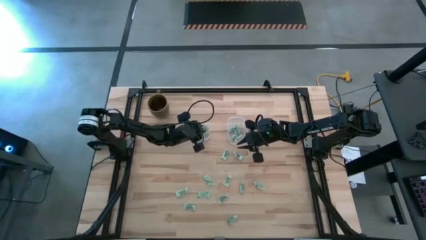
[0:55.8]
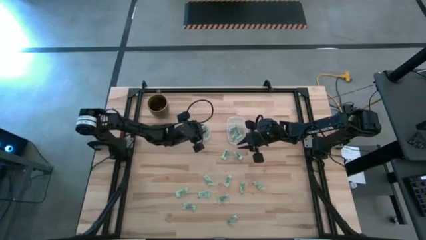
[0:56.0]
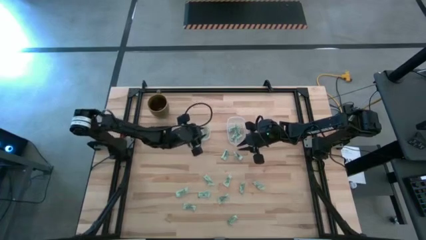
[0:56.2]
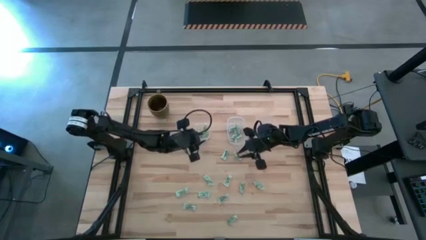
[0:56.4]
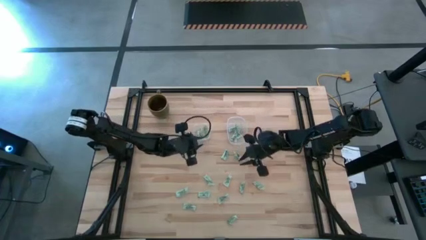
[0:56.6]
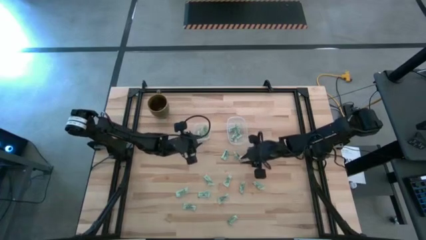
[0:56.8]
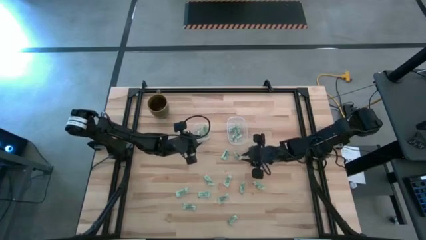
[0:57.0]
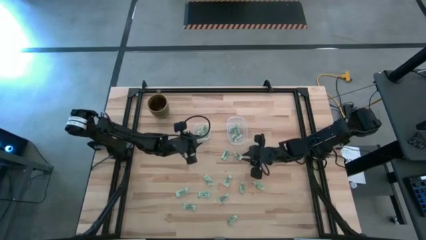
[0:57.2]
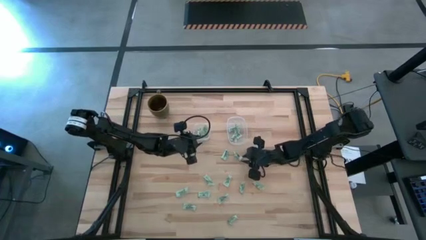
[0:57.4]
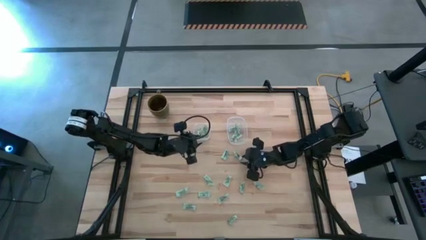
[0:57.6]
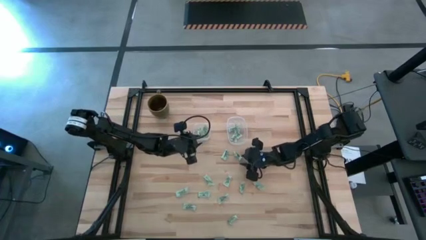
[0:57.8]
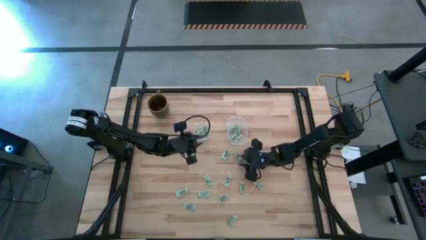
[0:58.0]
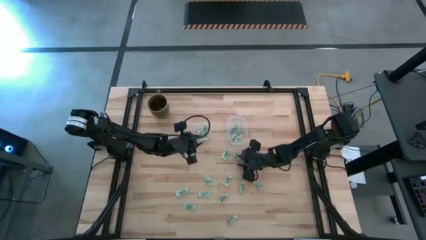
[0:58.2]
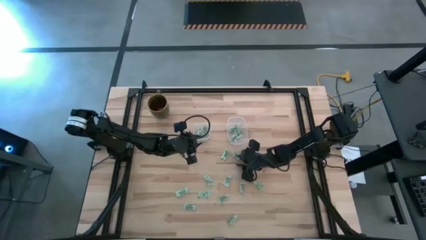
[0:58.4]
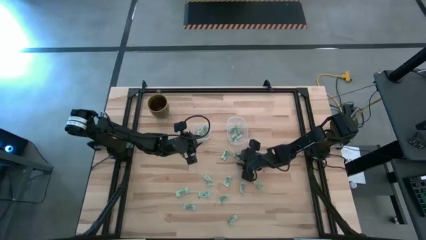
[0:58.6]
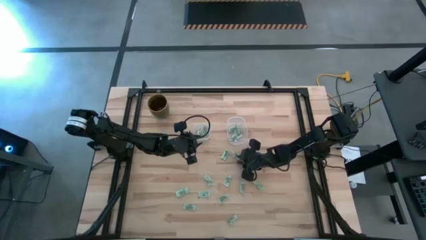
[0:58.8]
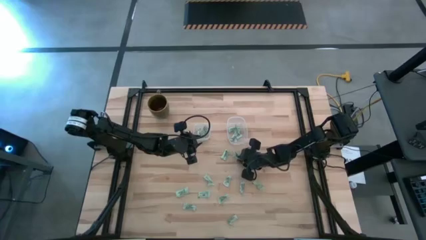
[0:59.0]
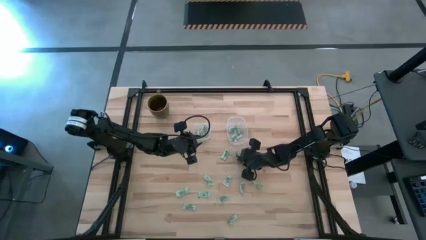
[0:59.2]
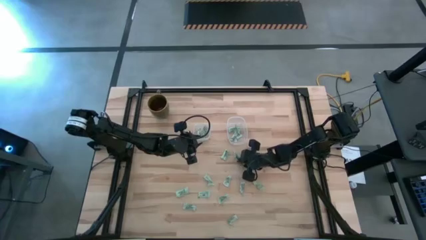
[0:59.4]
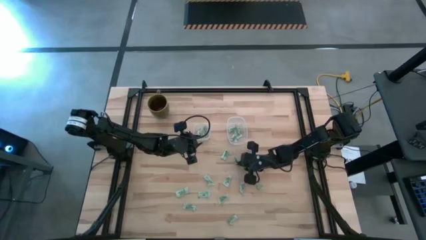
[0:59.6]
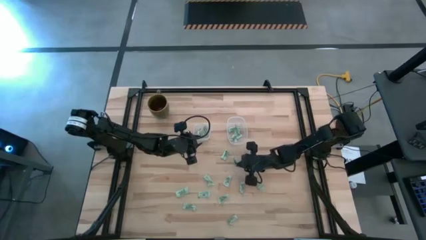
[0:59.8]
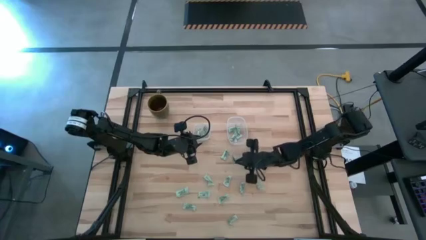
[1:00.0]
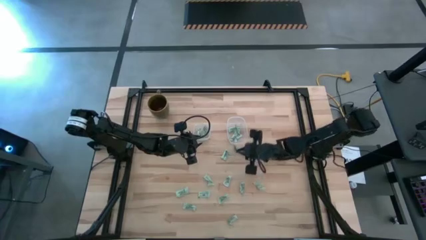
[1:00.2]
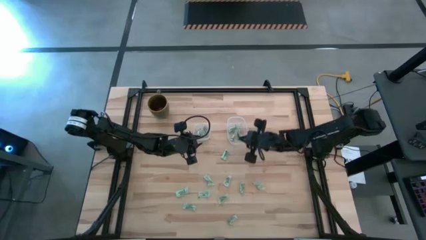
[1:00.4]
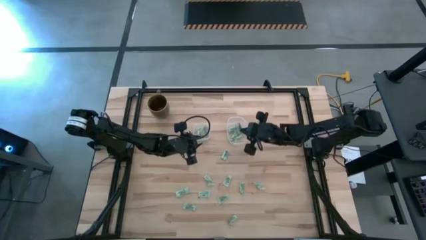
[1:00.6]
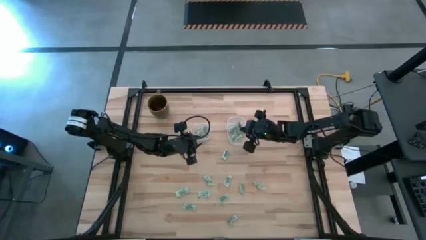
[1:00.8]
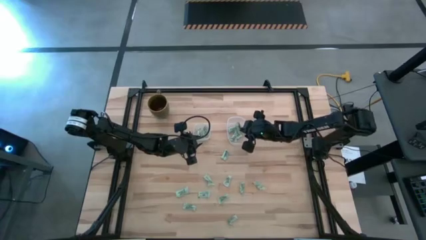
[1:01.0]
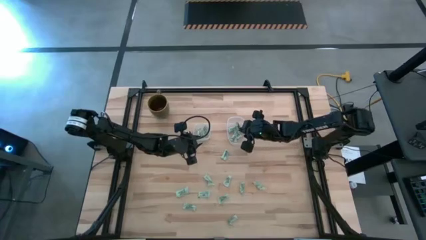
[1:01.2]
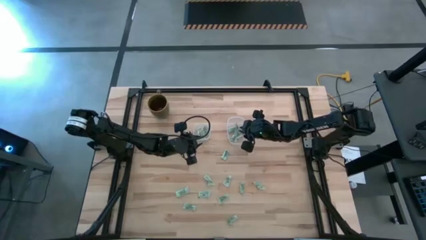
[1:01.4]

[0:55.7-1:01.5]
Task: Pick and place items into bin
Put the light green stevia packet into the right transparent bin

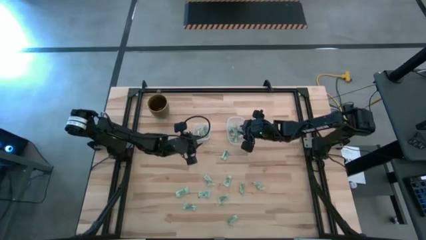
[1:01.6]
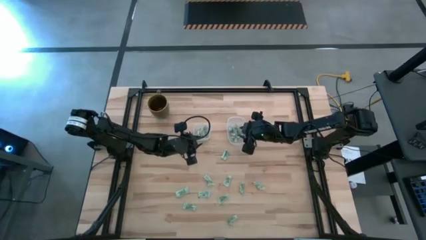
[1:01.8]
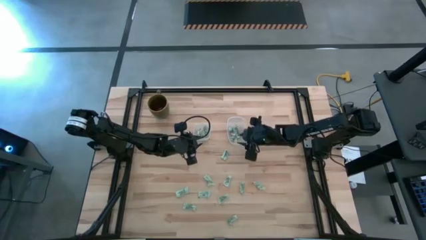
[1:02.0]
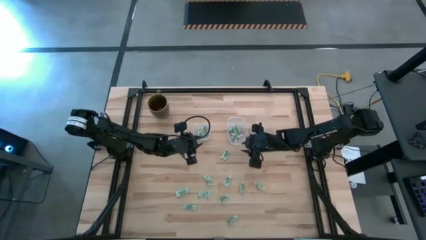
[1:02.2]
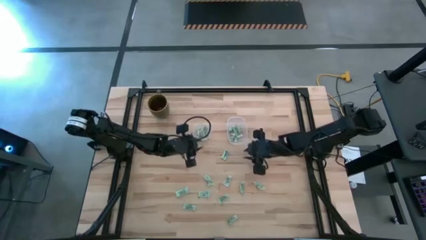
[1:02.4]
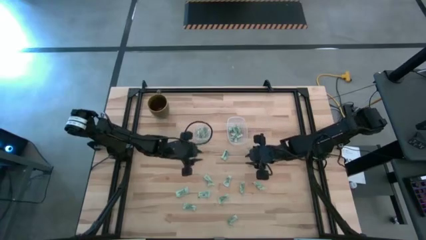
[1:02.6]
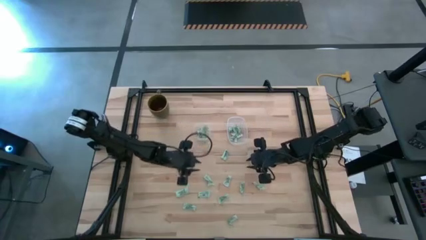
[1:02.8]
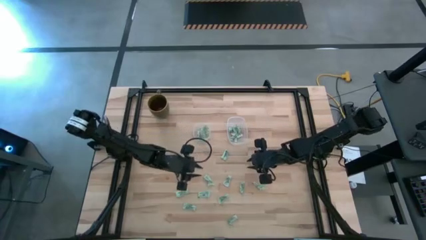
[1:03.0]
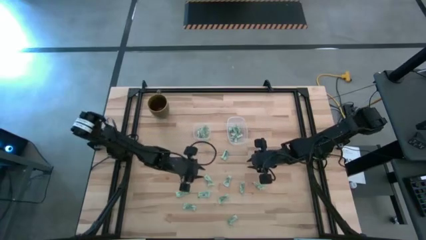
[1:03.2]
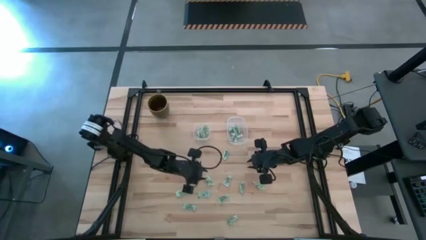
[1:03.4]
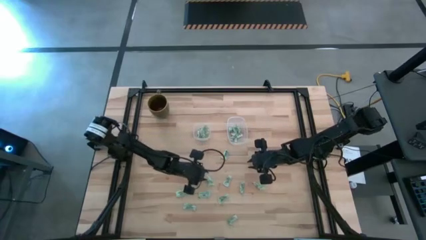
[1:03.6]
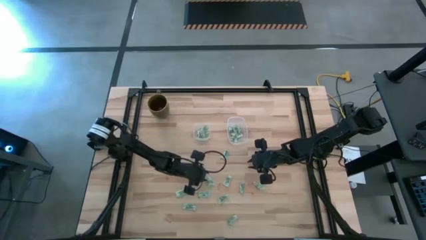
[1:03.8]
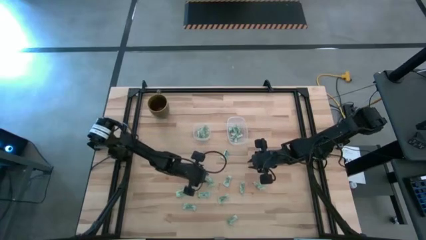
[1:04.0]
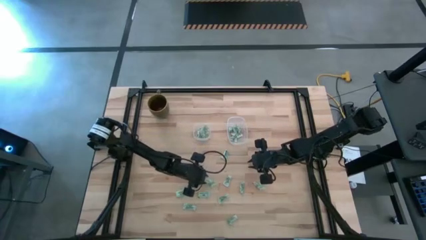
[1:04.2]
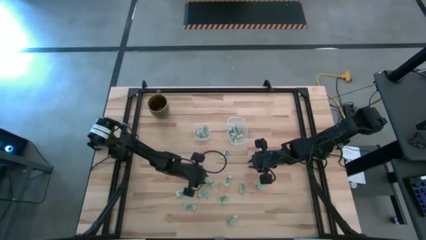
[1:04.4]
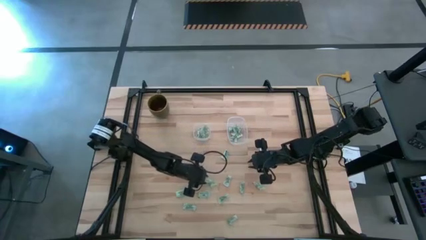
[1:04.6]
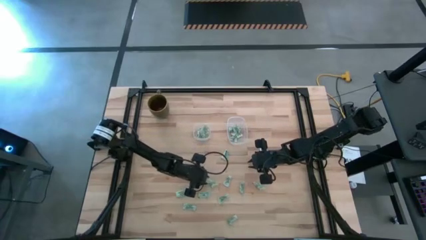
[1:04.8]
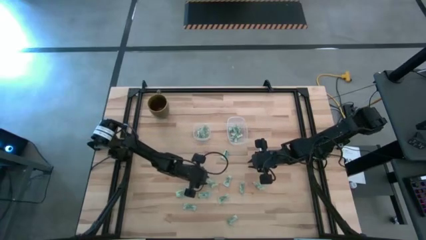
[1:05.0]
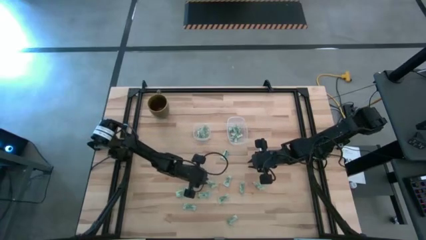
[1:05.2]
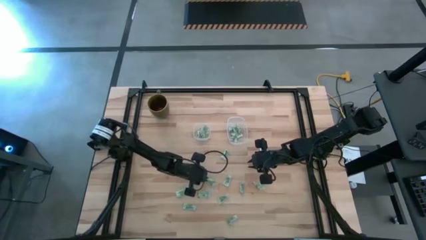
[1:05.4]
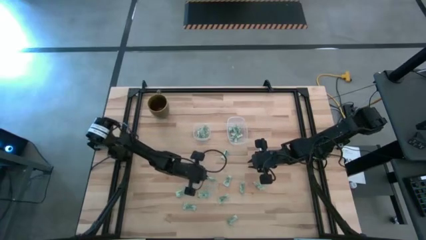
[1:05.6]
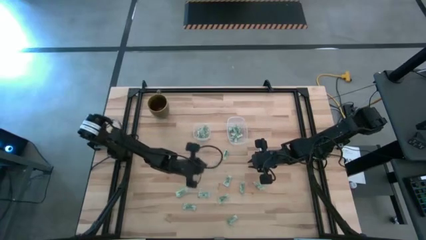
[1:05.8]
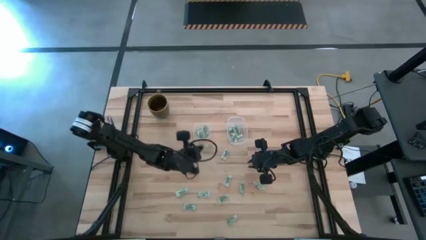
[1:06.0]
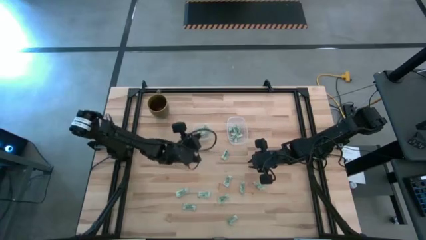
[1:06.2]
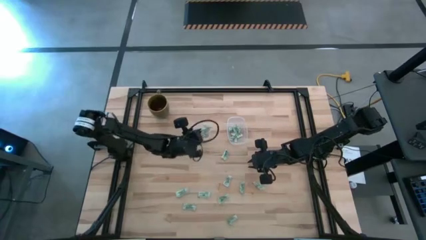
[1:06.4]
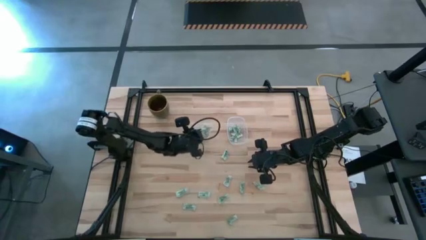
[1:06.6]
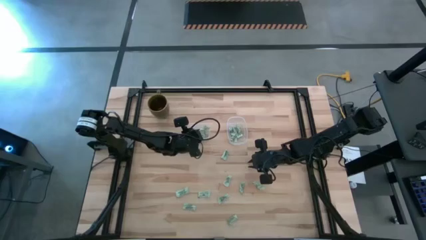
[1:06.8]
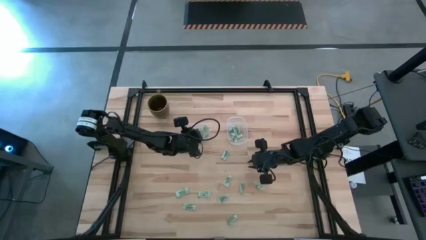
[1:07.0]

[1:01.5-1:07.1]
Put the light green stevia packet into the left transparent bin

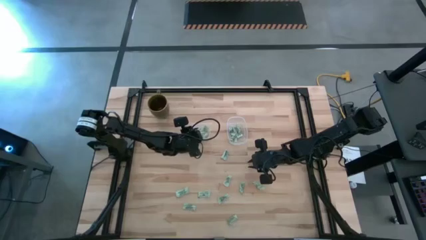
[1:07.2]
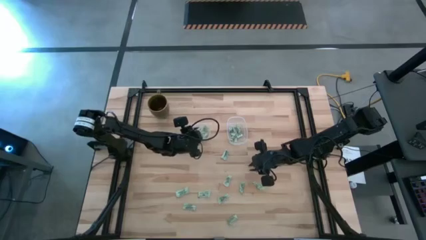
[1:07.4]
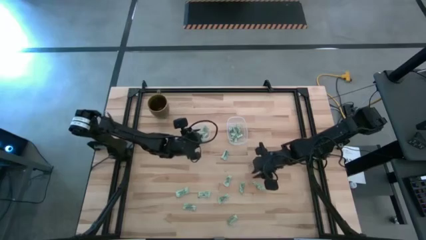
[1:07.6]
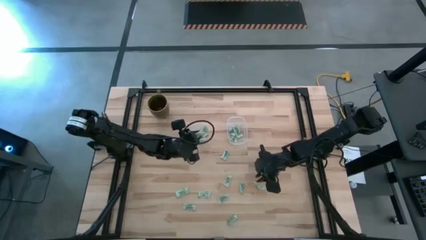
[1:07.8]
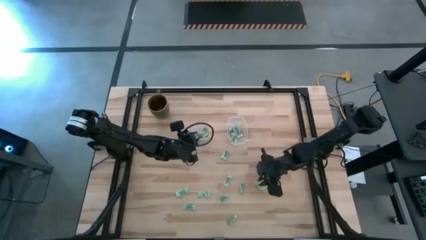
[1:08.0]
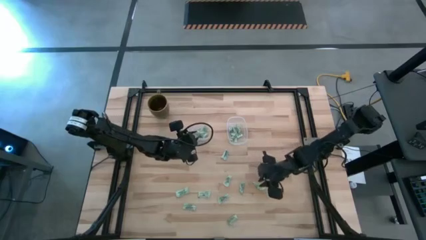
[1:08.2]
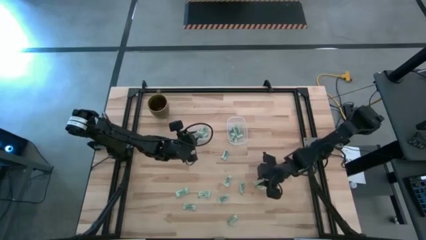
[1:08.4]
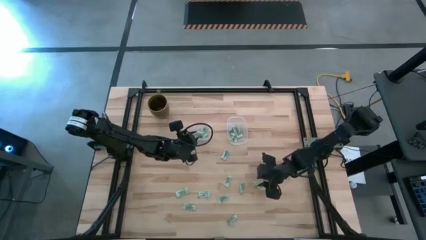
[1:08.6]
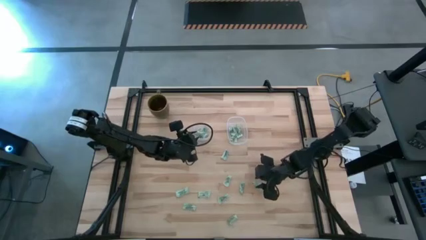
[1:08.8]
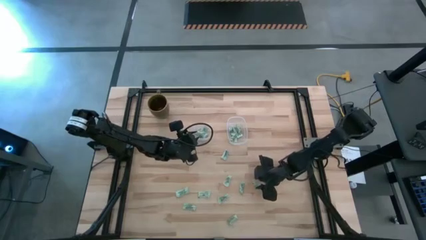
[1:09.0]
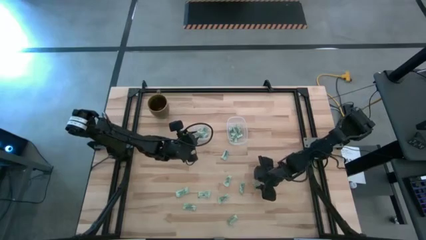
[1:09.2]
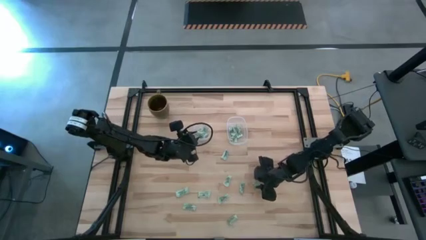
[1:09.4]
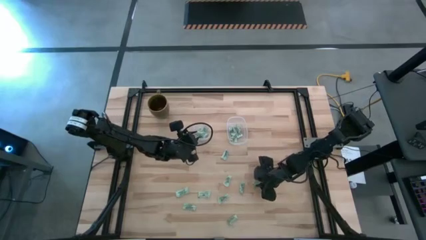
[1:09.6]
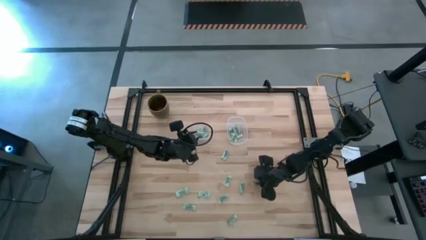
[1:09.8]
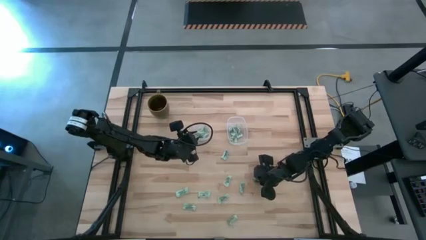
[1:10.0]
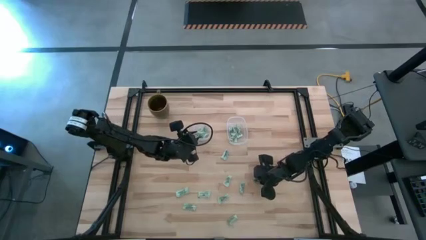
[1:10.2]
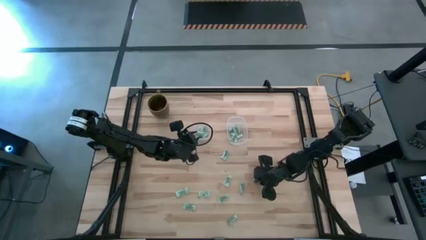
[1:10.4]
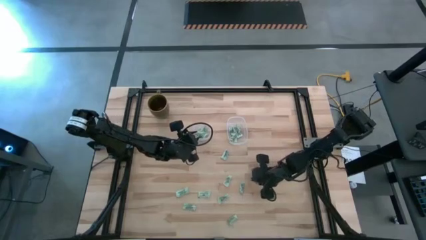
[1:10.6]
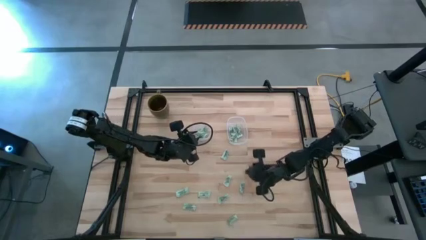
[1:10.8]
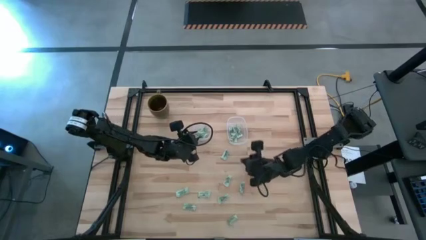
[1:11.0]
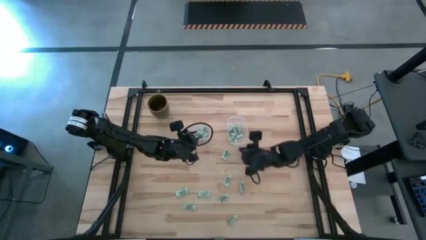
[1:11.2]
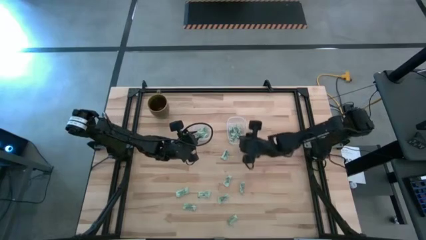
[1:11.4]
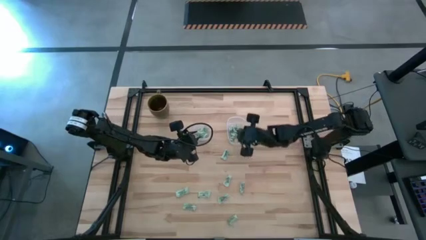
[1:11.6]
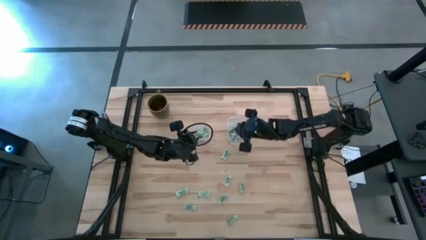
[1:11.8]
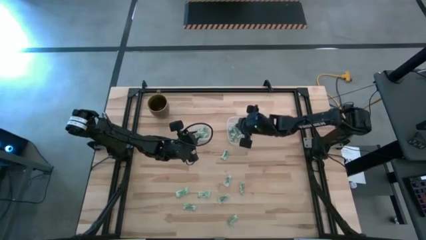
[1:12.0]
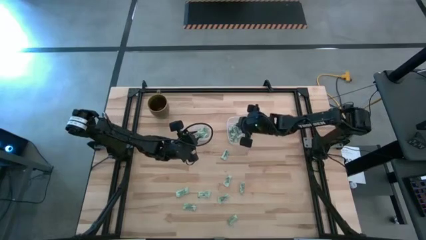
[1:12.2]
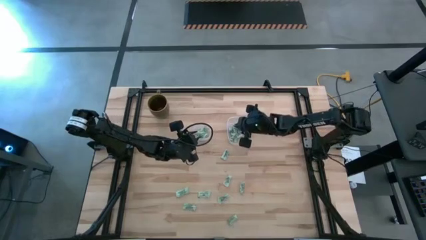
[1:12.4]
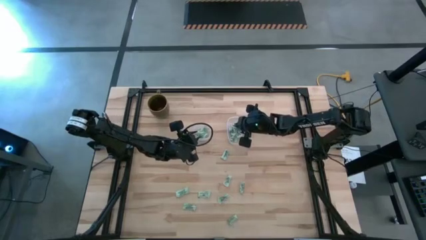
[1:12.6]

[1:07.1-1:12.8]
Put the light green stevia packet into the right transparent bin
